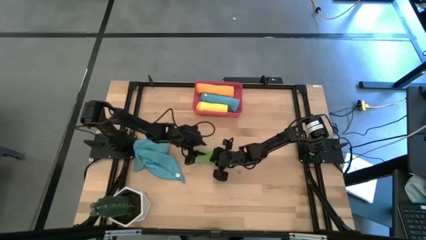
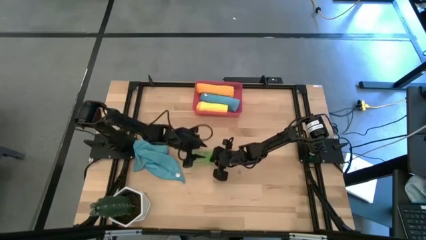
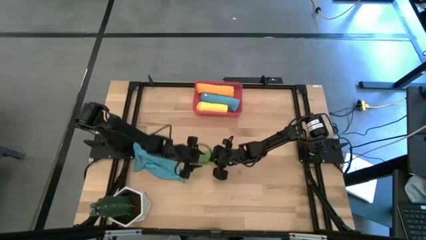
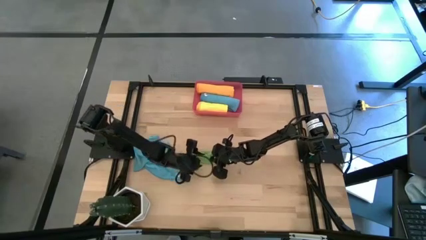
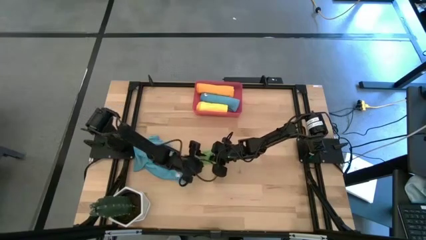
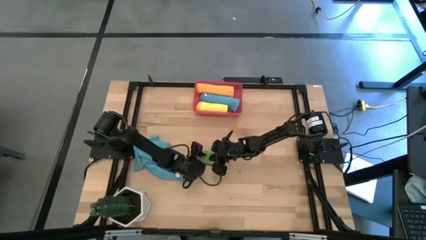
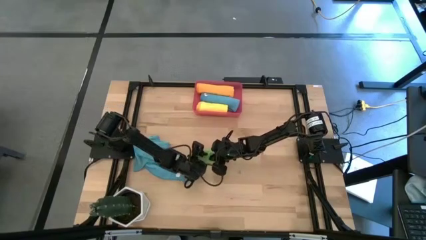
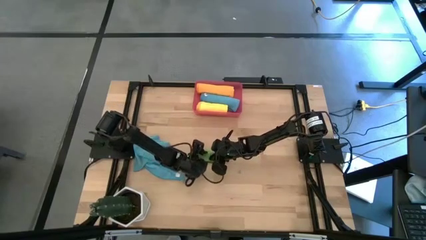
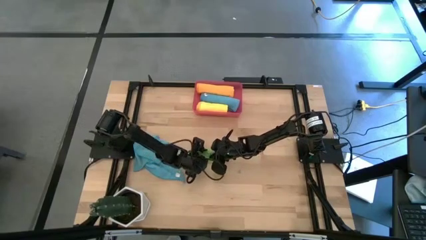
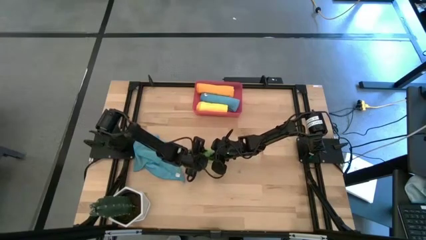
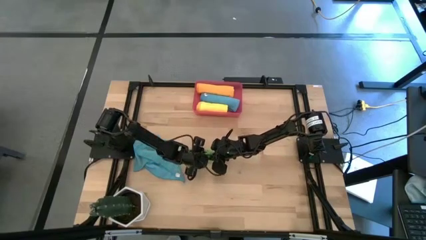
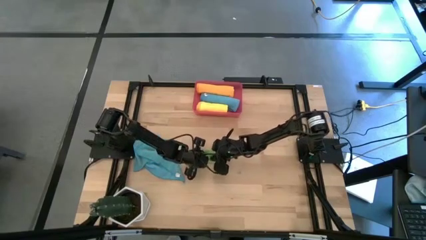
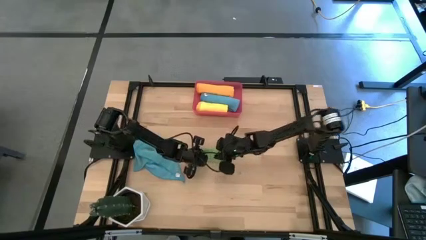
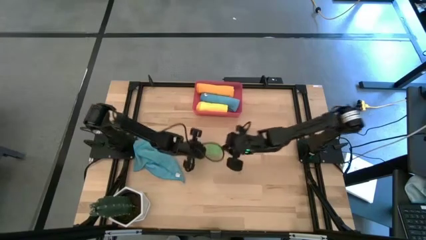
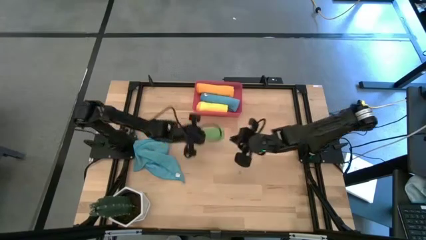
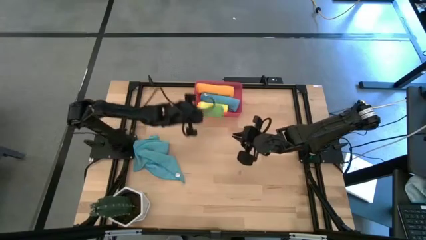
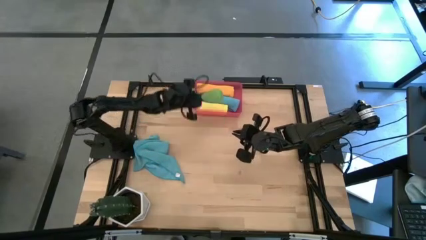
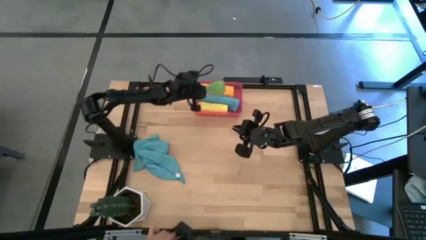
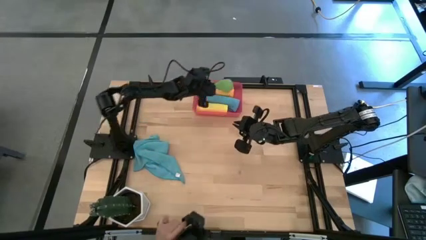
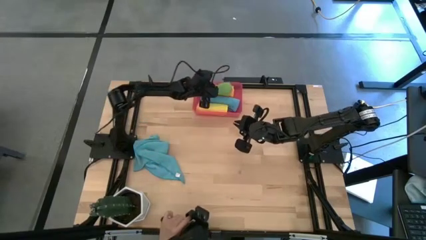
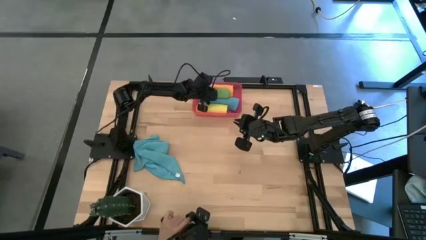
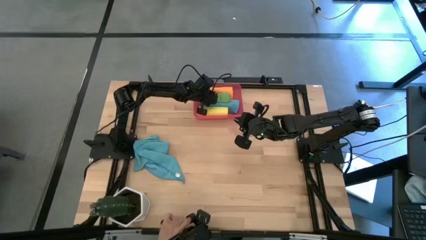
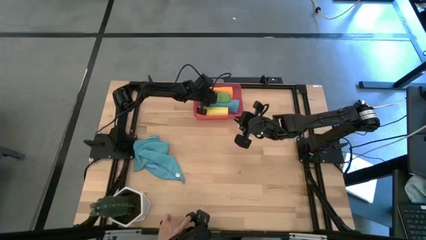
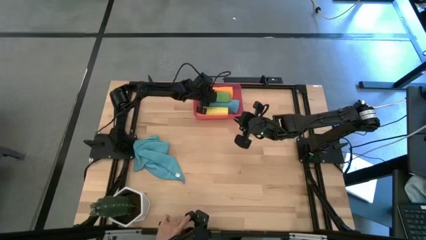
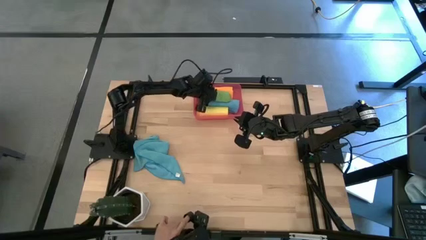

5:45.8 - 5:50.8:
Task: Roll microfiber towels into tight, uniform cylinder then place into a basket
Put the green microfiber cloth into the red bin

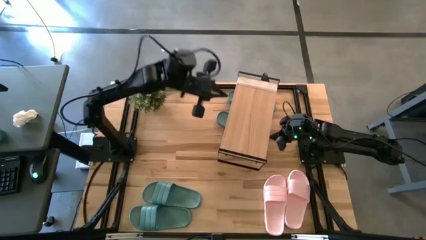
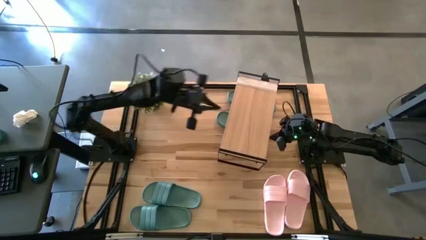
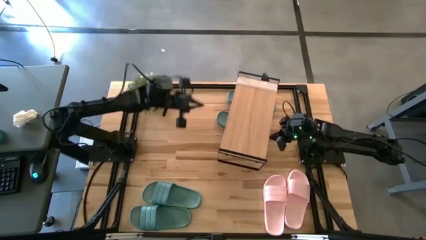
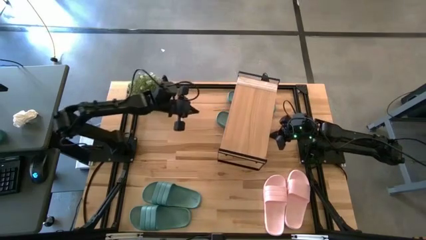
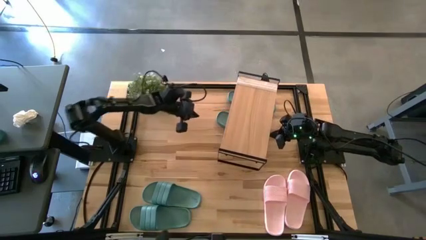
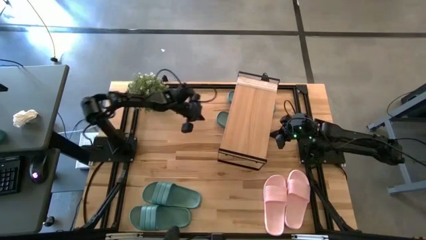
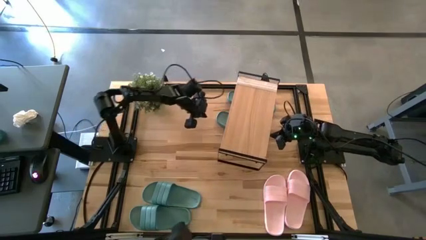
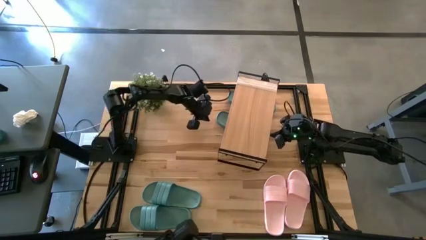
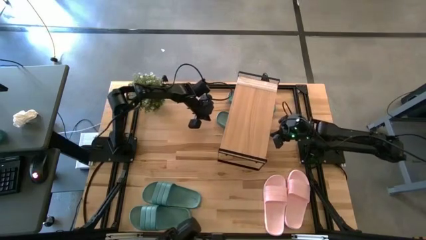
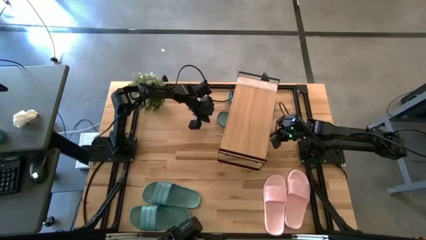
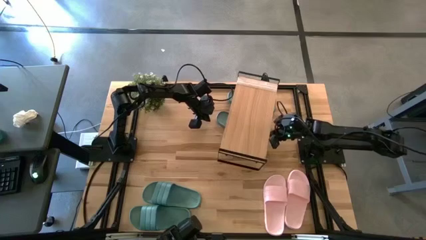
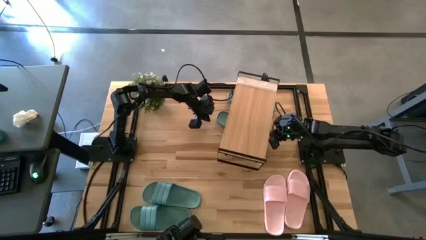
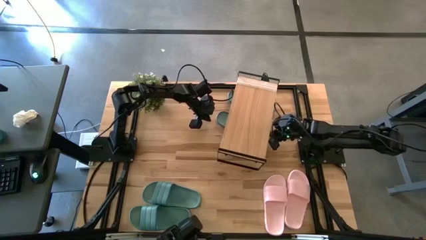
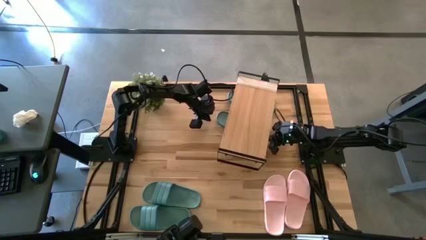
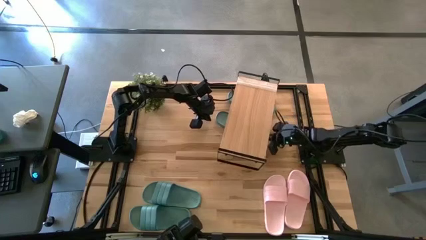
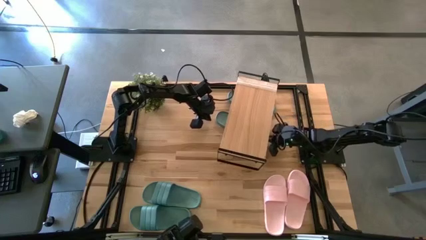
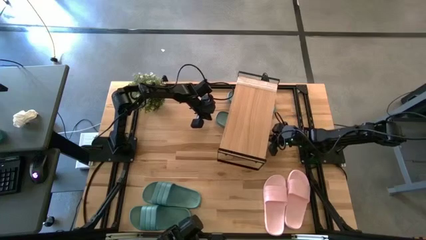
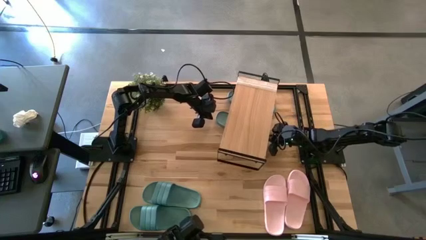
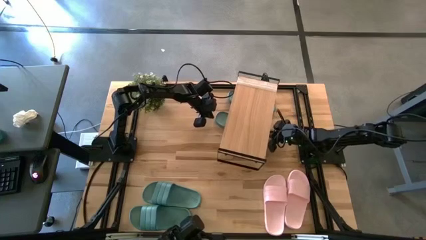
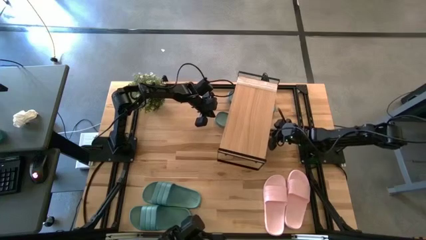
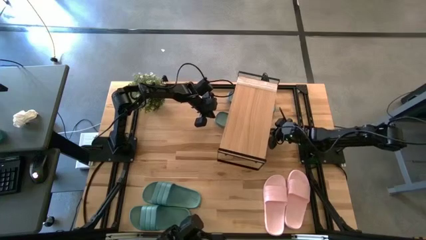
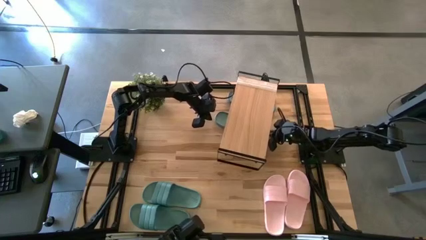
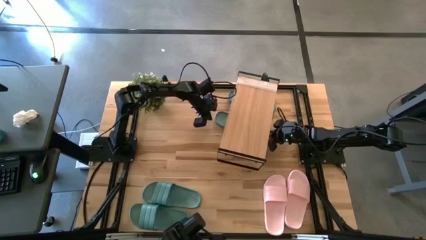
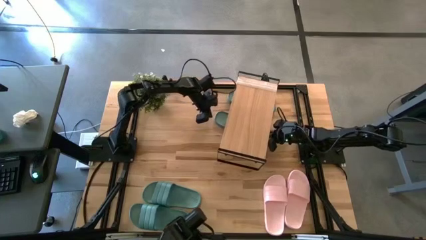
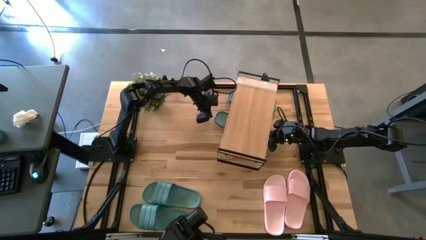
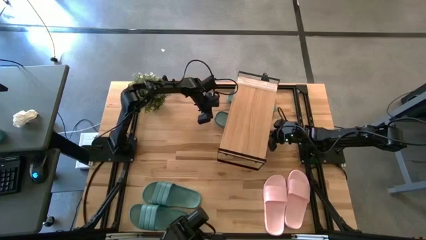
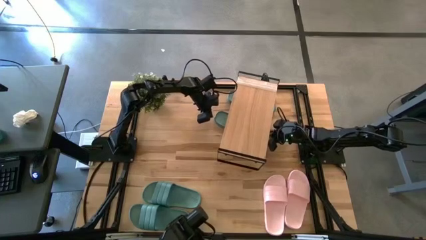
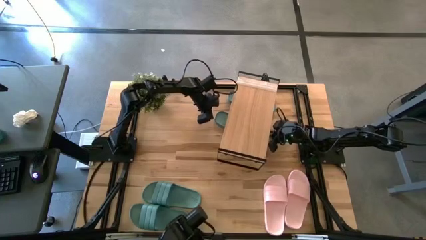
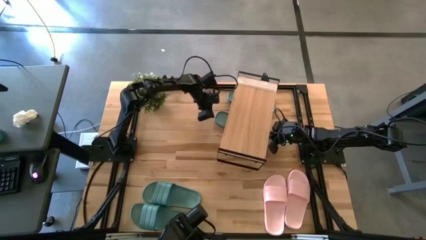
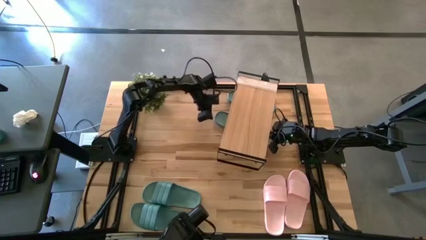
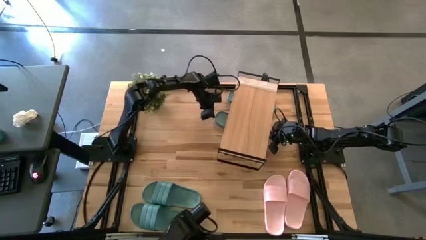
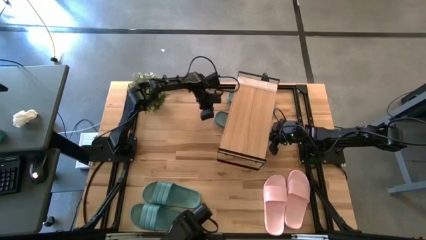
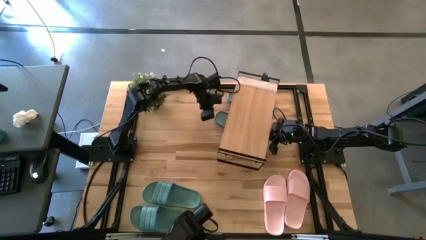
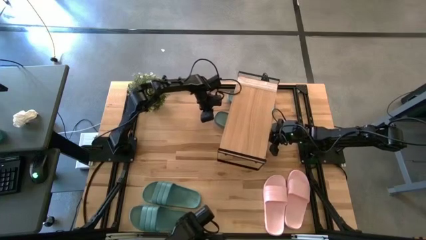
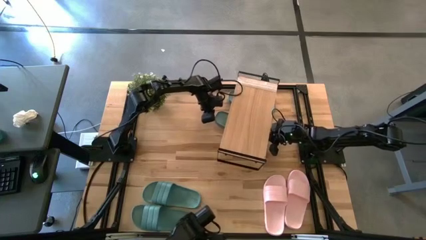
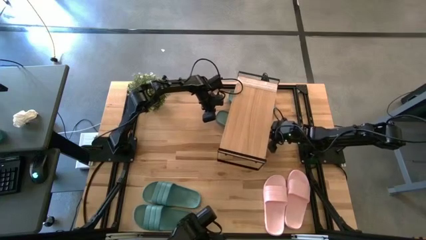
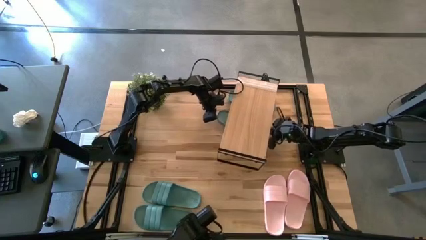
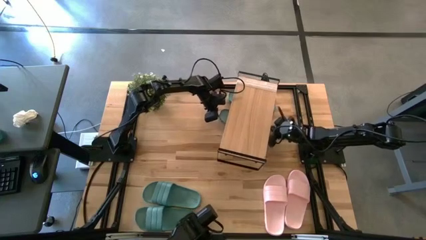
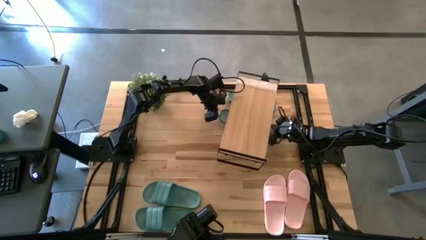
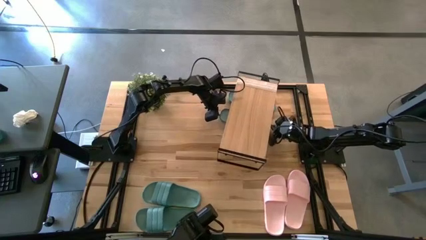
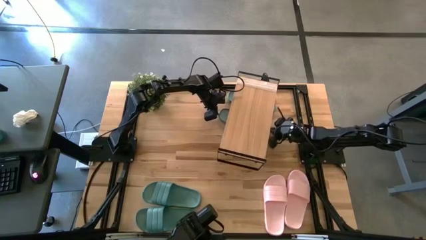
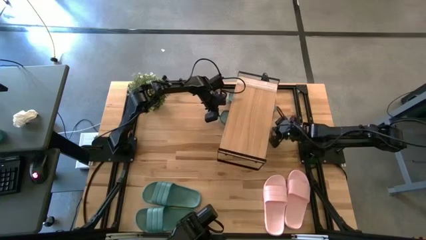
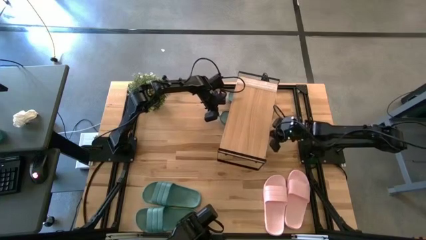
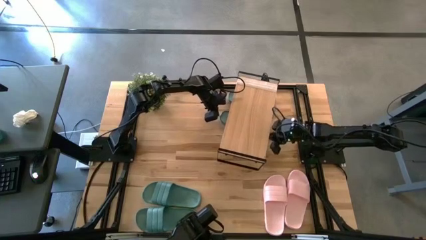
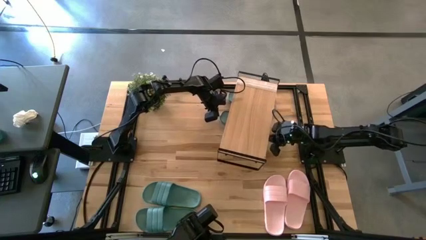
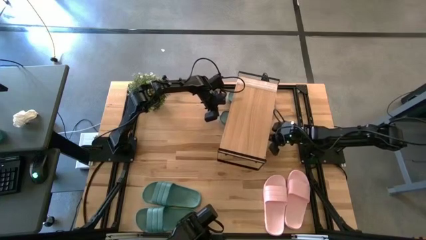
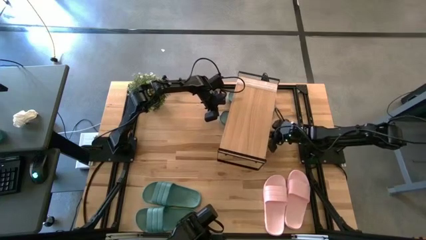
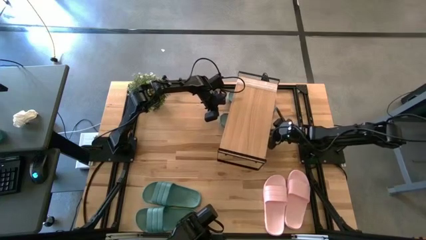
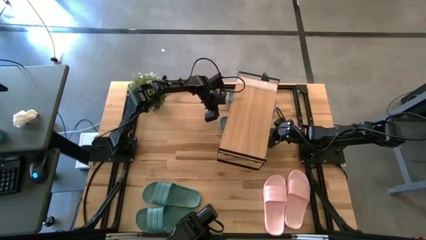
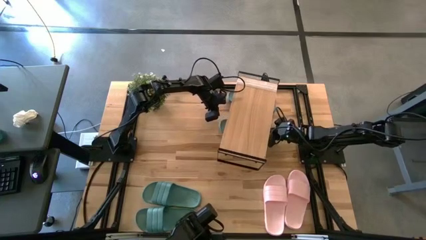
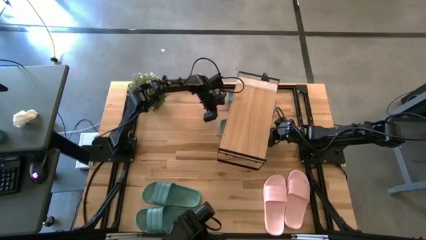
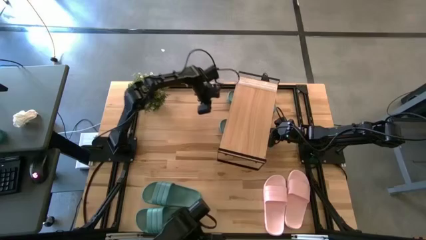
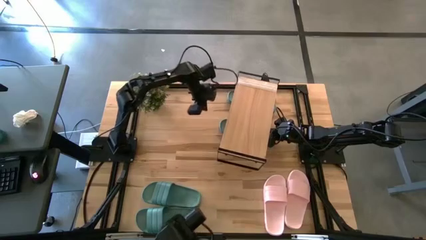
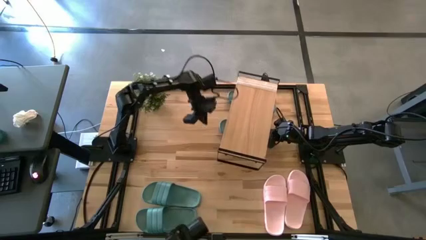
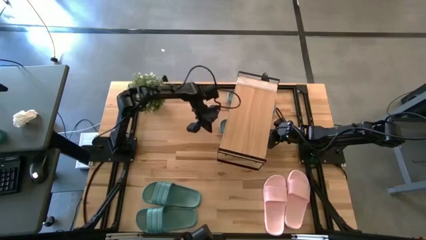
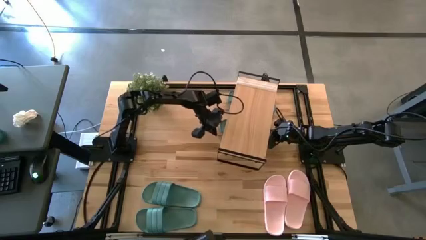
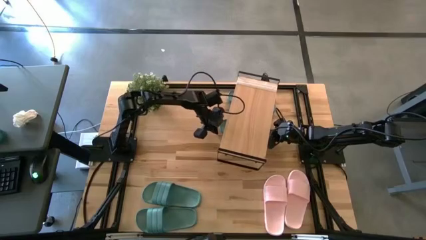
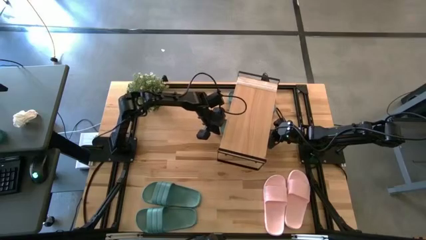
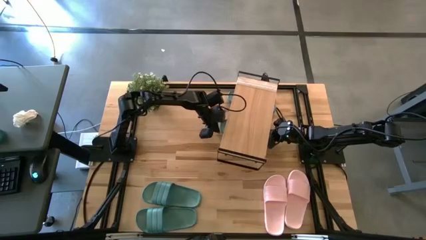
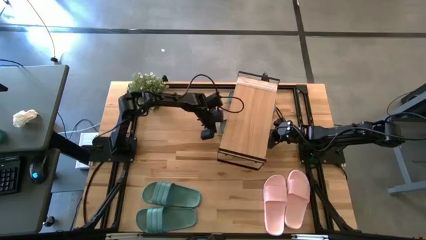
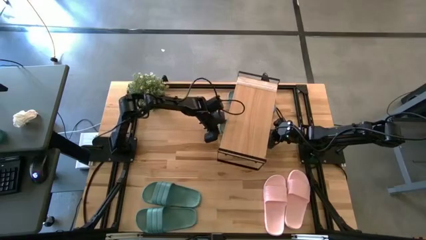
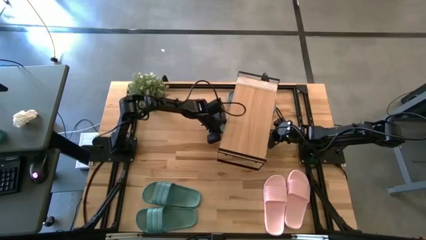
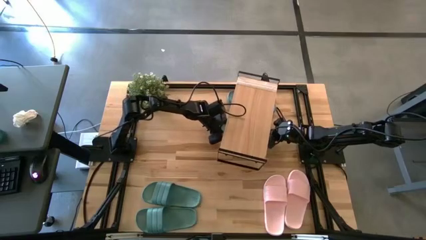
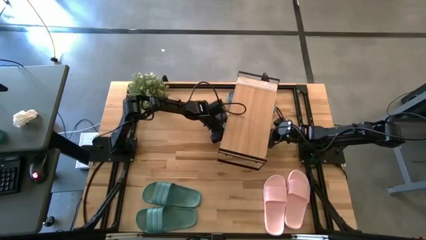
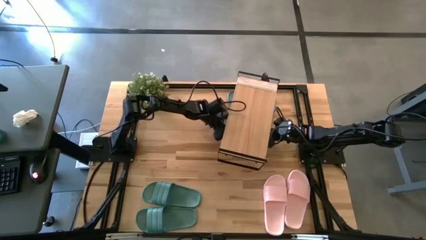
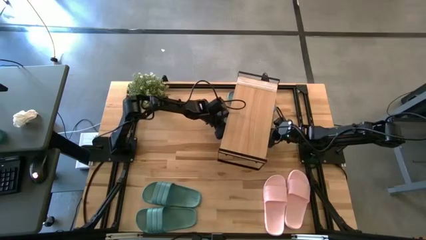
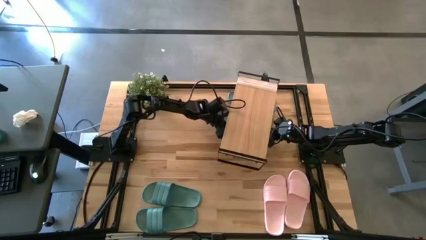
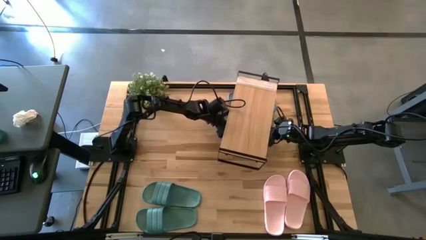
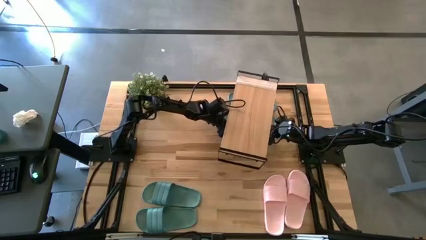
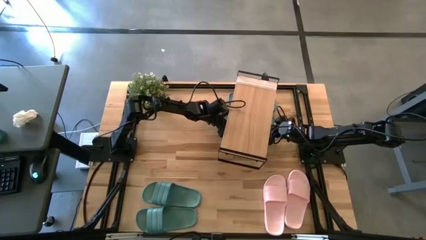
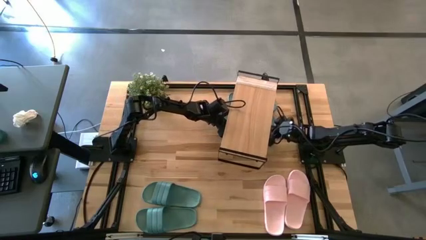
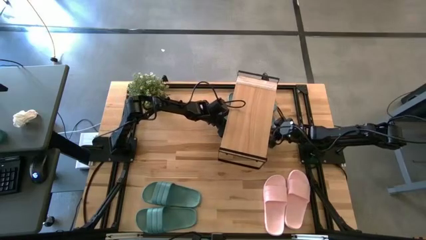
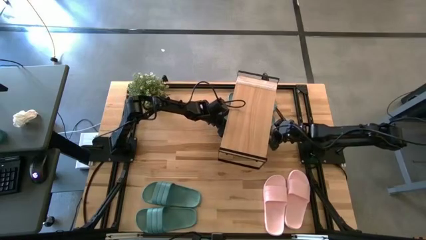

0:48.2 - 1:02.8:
Task: Pick and place slides into the shelf
Adjust the green slides under the shelf
